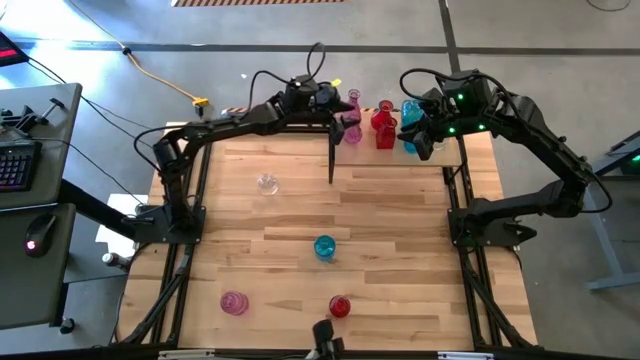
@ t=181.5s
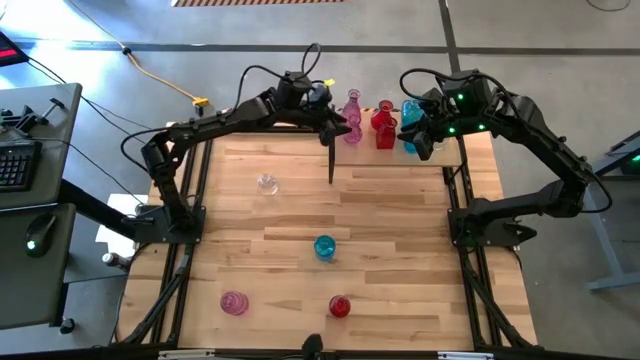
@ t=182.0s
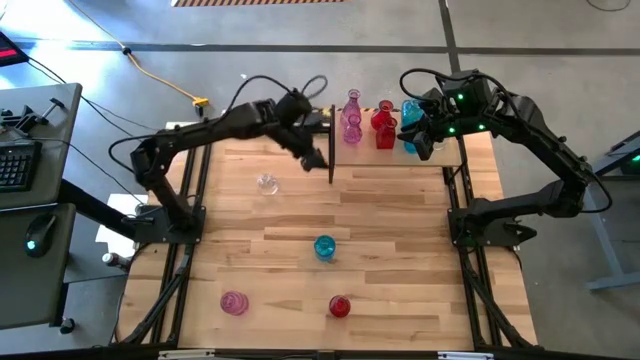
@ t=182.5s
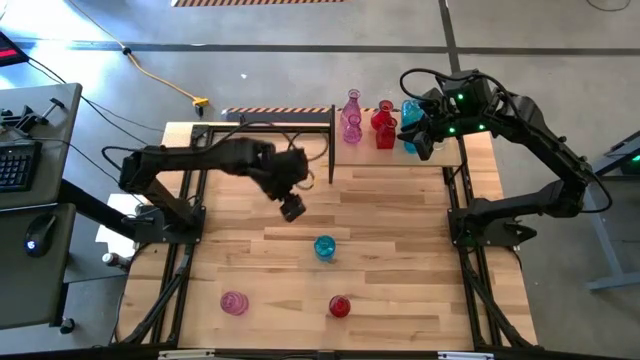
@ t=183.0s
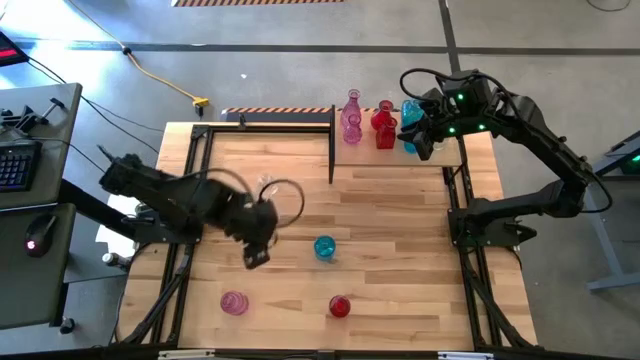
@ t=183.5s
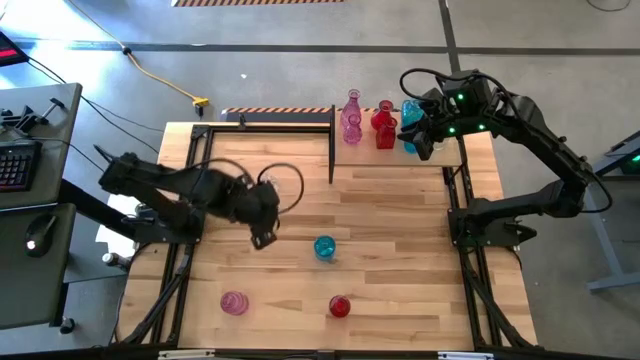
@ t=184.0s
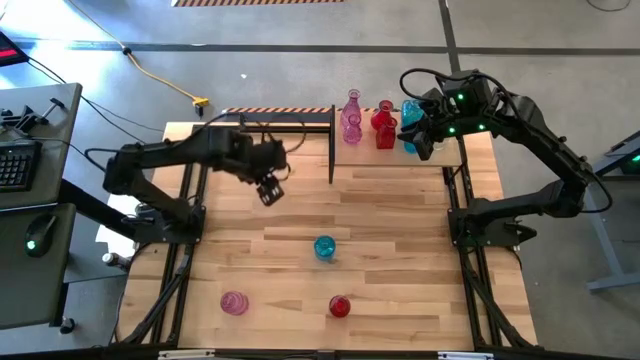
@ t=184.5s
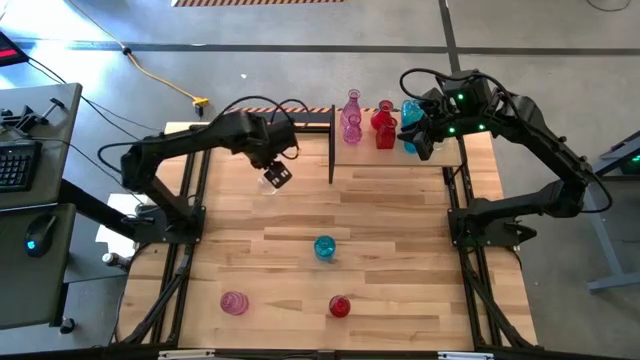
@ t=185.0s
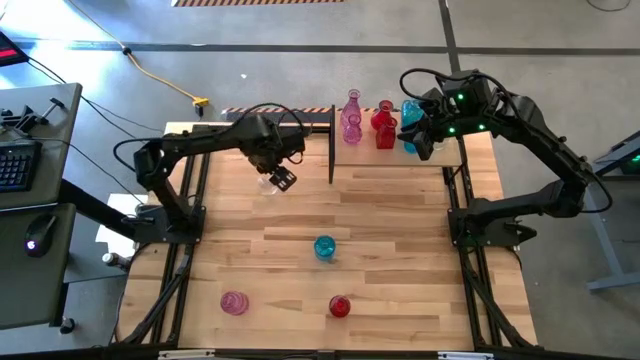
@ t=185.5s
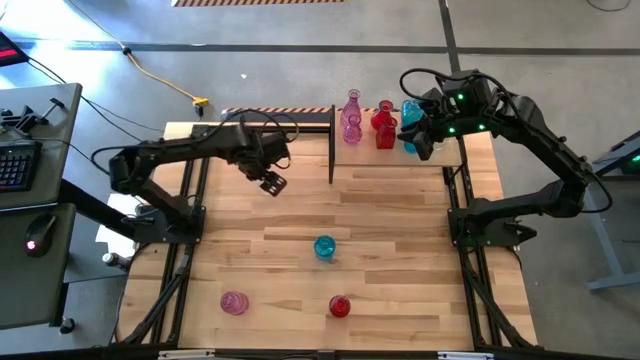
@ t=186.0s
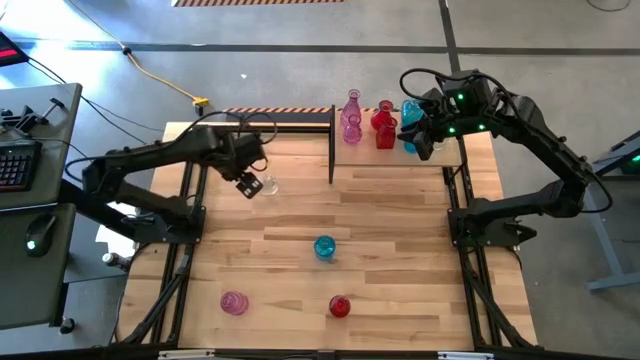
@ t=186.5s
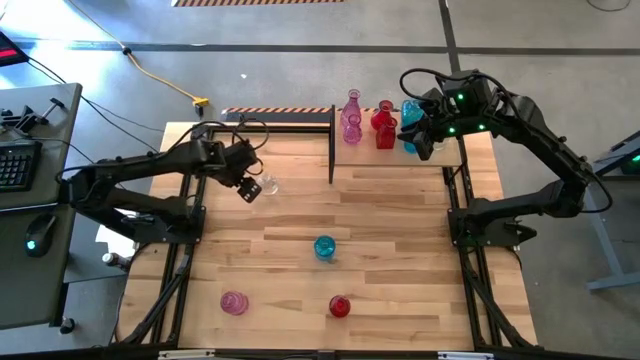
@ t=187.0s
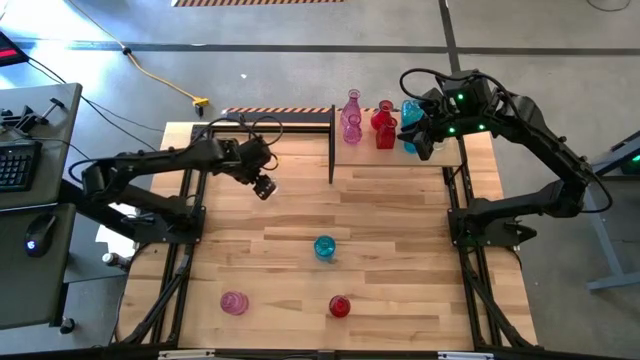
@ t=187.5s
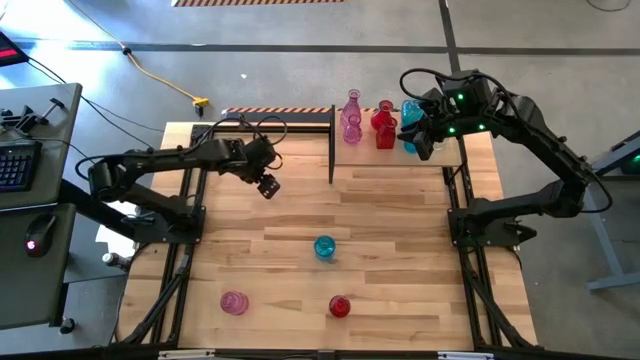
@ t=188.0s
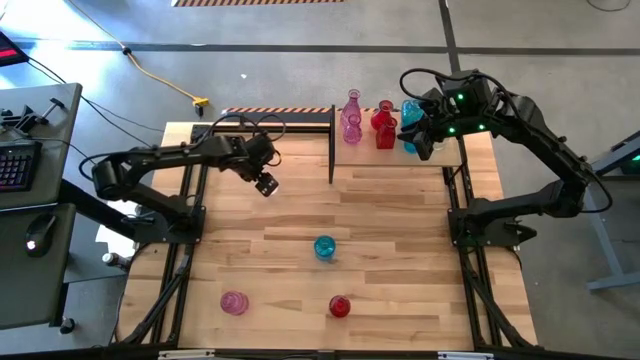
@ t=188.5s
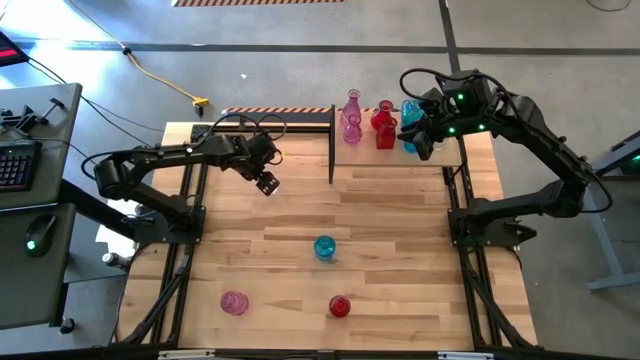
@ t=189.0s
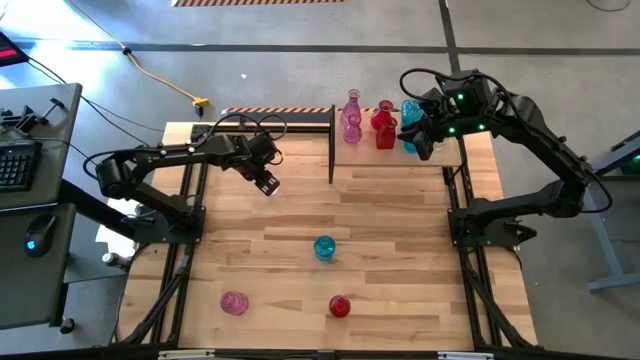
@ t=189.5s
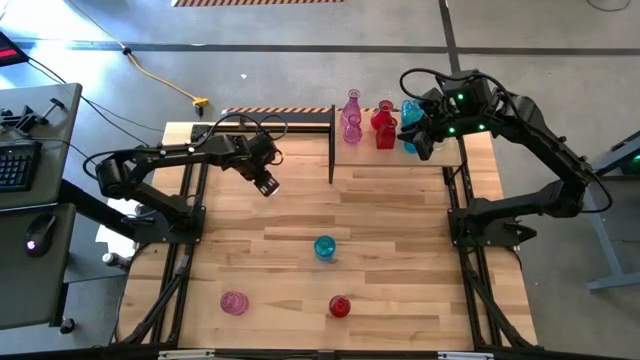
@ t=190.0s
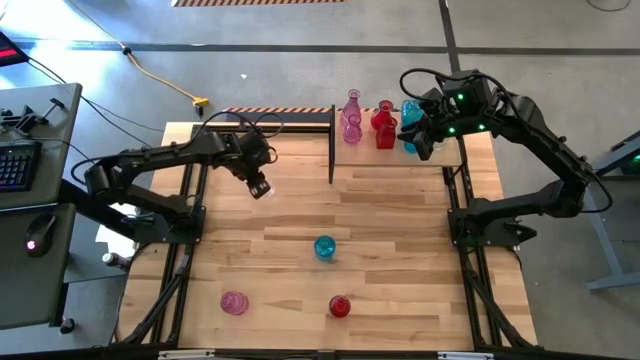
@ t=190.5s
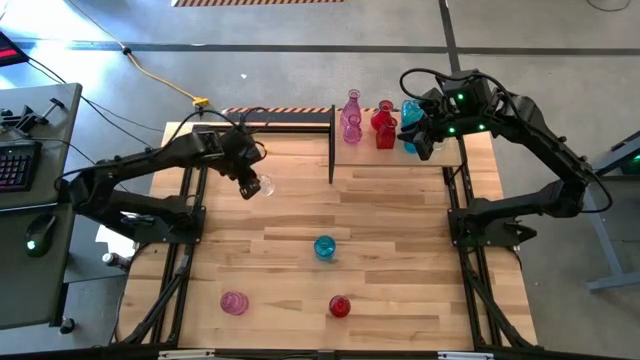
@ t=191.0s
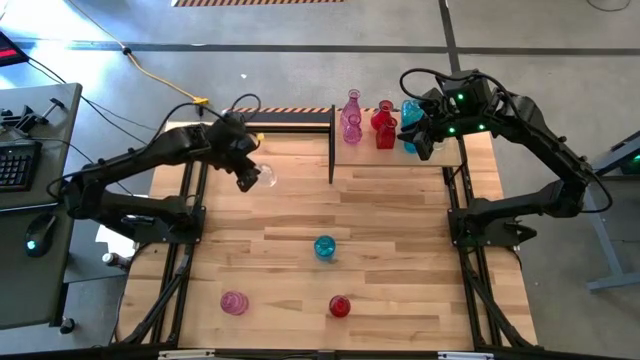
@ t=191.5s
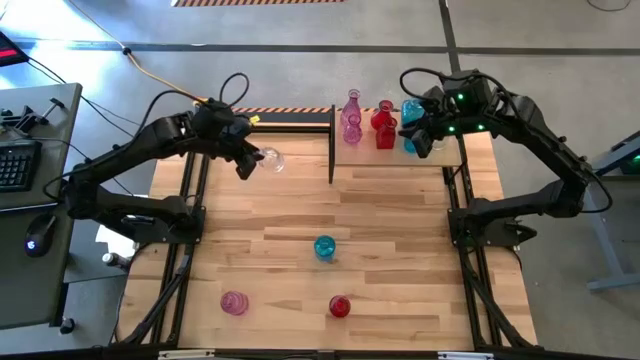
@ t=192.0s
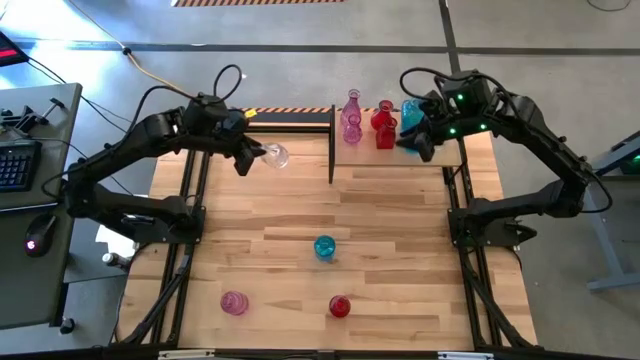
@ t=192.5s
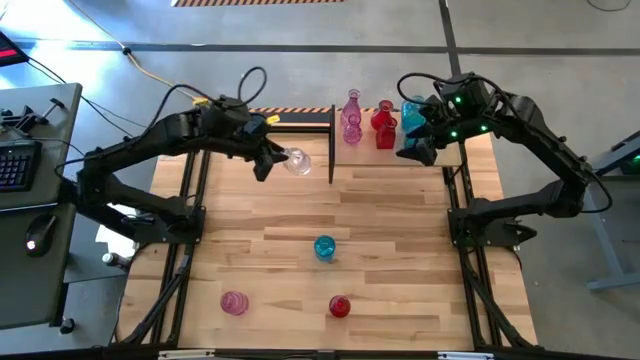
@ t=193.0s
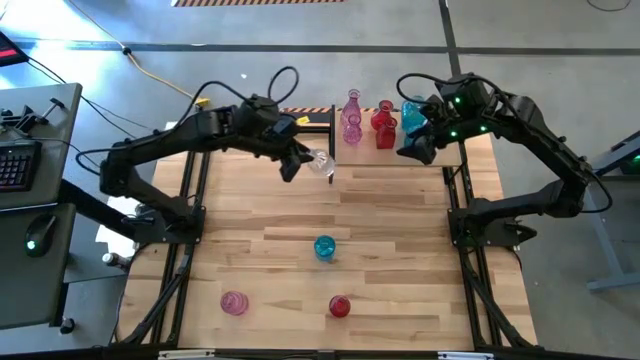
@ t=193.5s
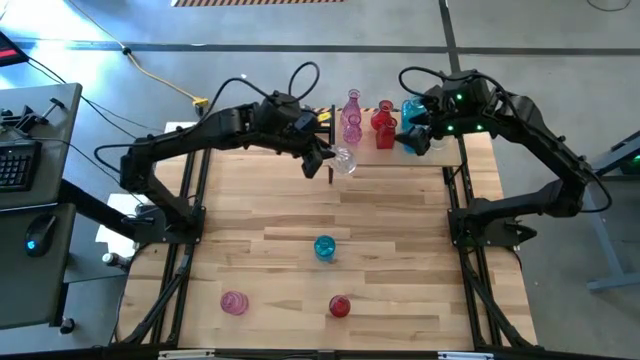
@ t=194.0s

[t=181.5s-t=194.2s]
Task: sort vases onto shelf
Put the transparent vase on the shelf aligned with the transparent vases

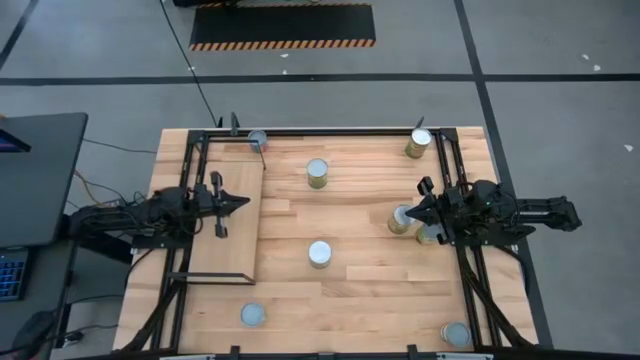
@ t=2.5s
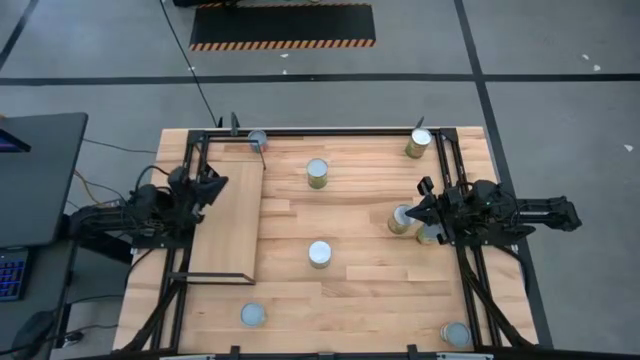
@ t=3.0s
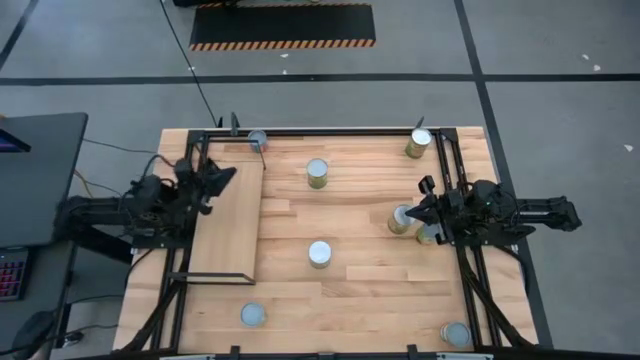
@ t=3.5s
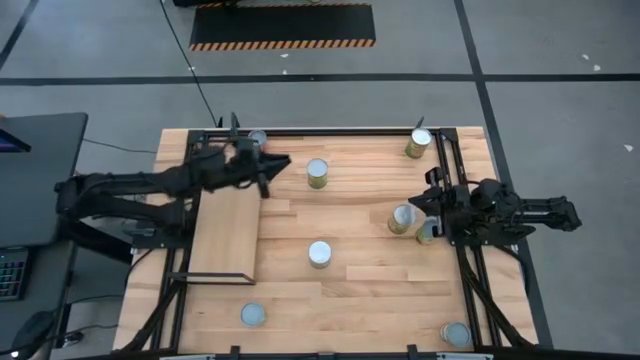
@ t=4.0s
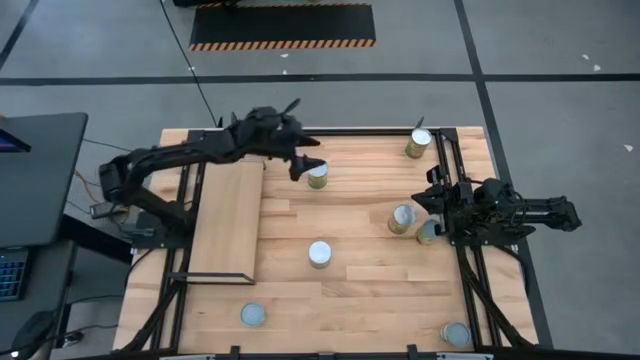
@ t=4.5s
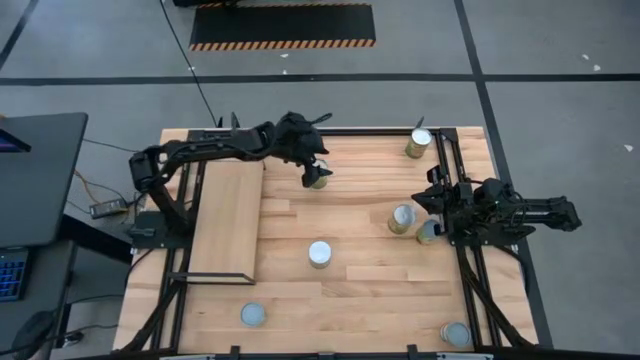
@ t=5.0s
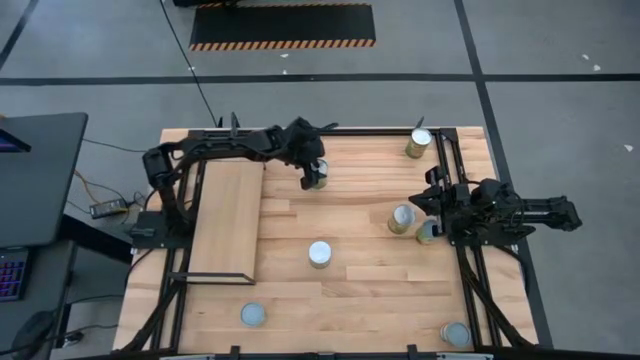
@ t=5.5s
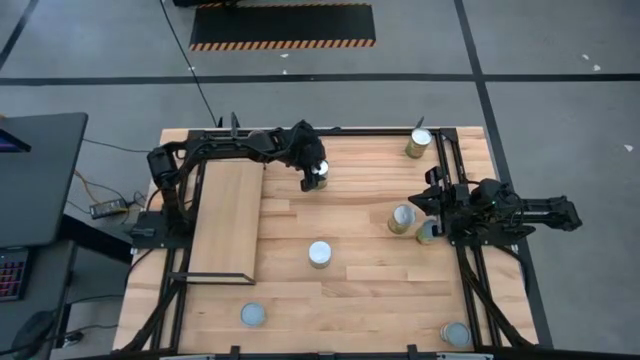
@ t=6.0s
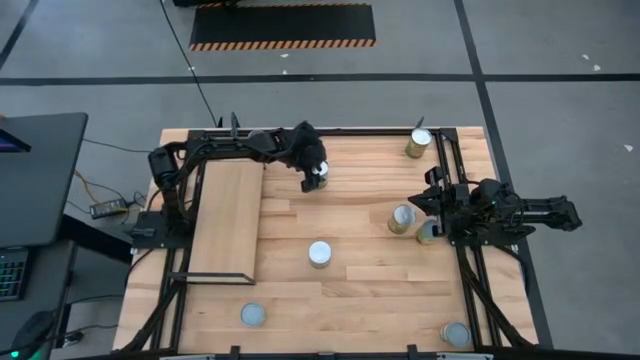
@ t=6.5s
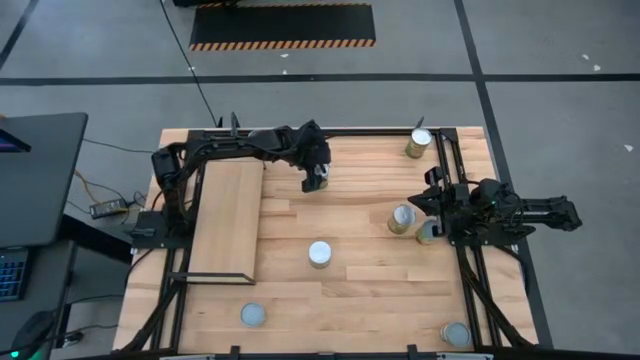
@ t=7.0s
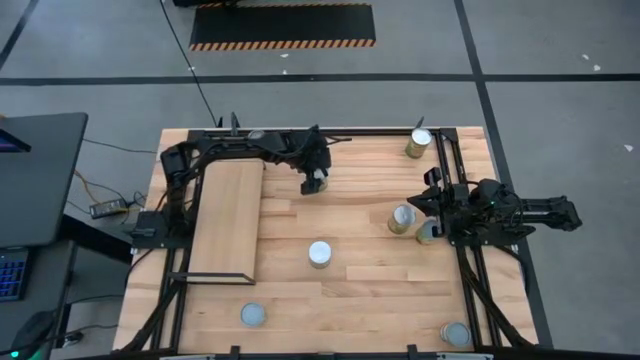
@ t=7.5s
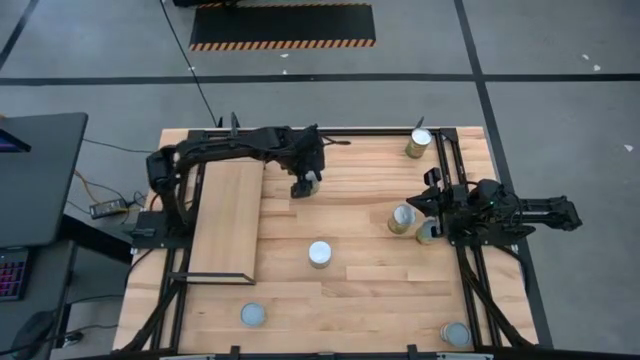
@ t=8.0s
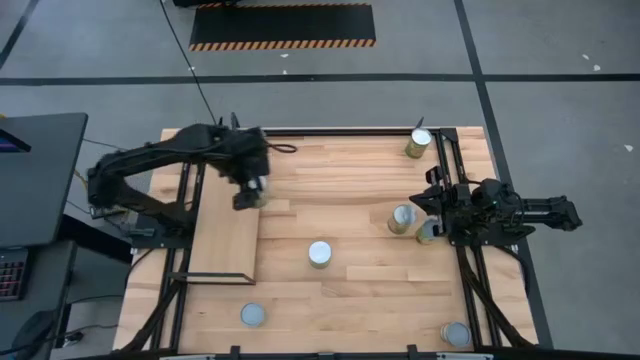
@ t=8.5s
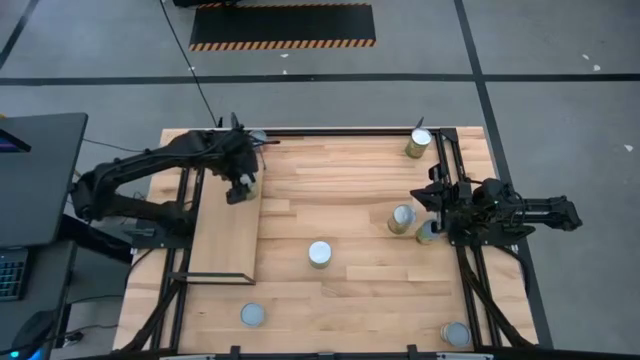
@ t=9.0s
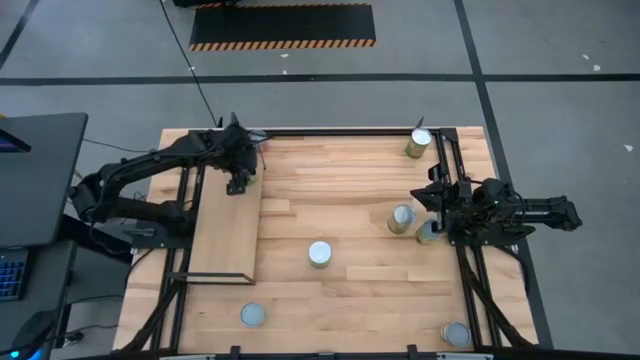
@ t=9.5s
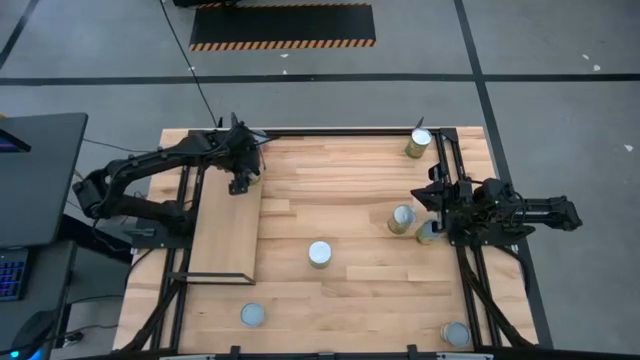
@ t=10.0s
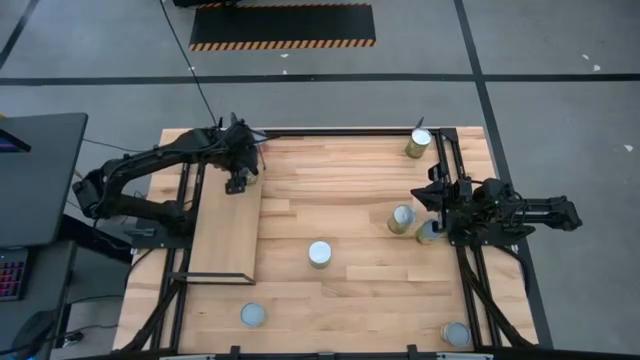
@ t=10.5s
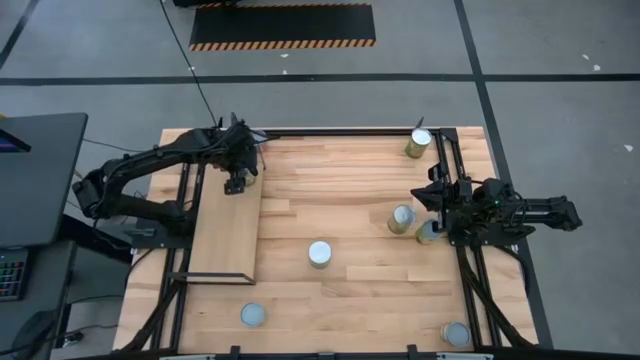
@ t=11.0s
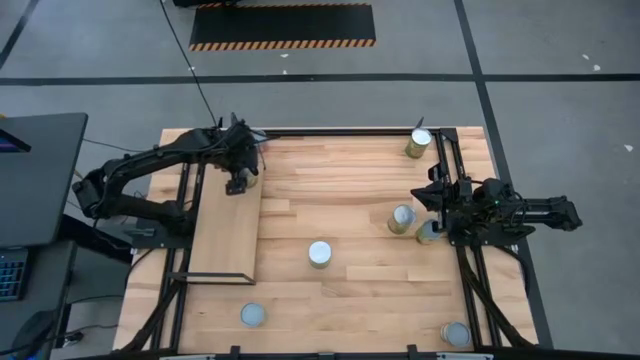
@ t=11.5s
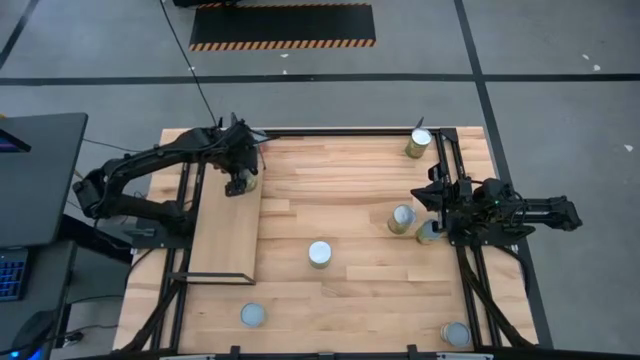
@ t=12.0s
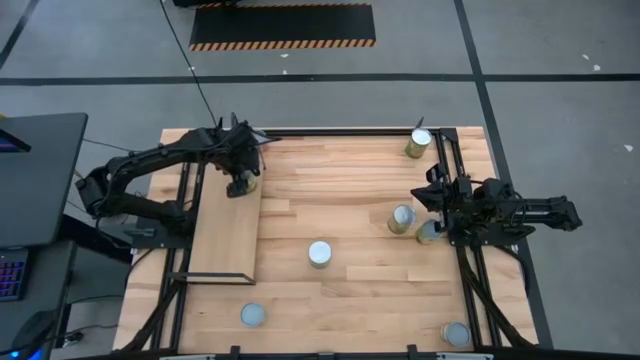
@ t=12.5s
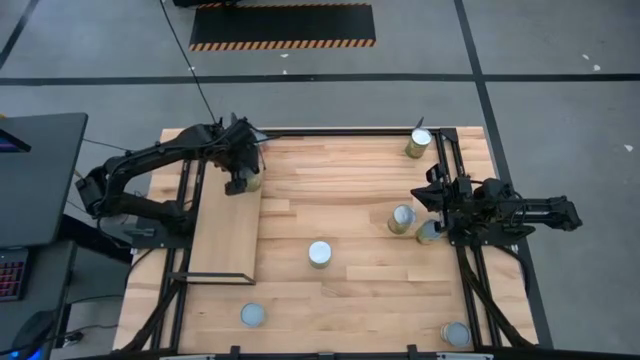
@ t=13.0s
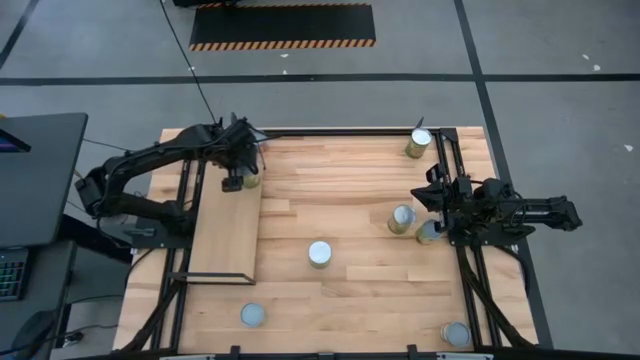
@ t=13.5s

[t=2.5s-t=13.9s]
Task: Pick and place cans onto a shelf
Put the top canned pears on the shelf
